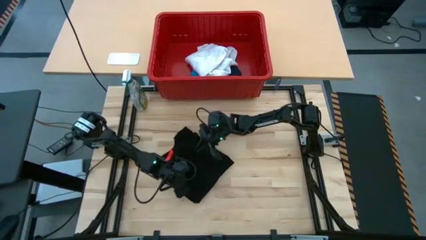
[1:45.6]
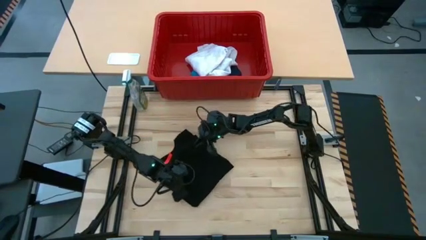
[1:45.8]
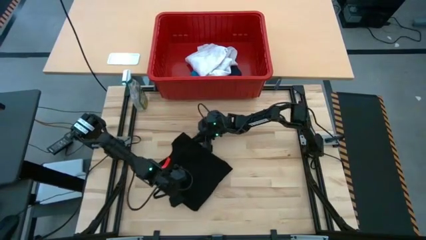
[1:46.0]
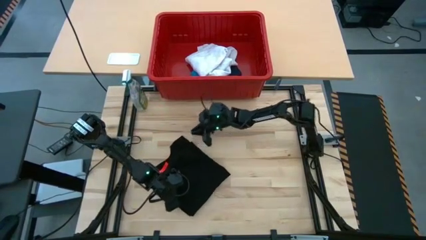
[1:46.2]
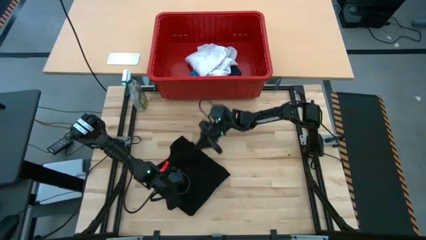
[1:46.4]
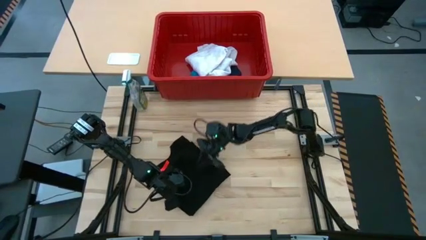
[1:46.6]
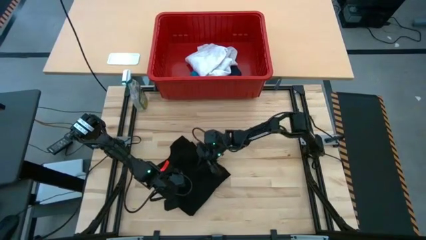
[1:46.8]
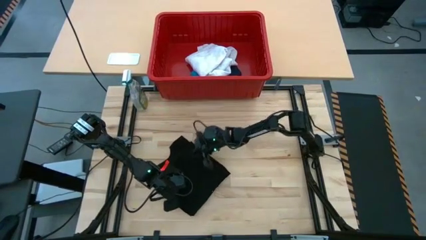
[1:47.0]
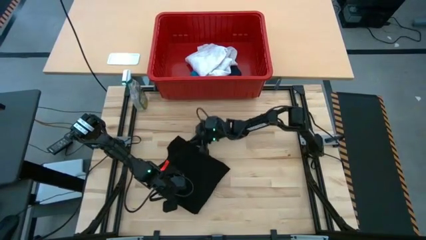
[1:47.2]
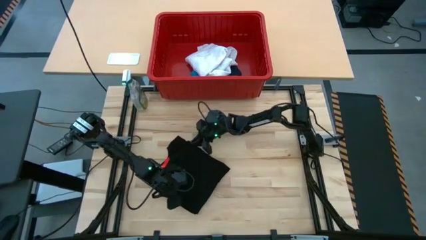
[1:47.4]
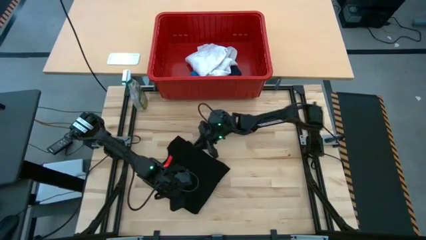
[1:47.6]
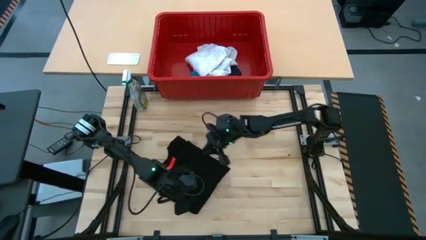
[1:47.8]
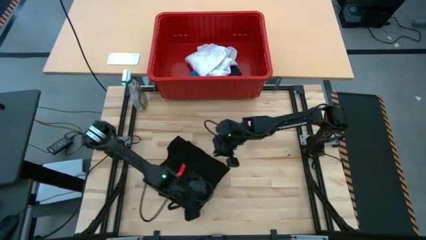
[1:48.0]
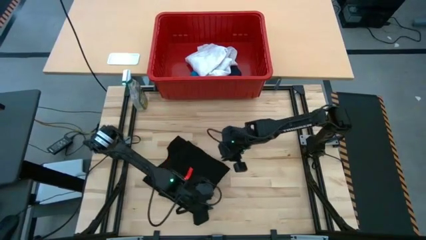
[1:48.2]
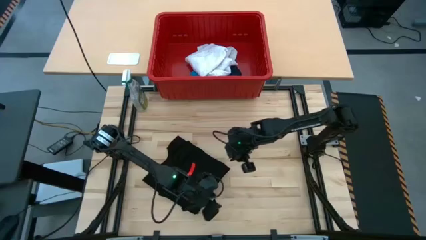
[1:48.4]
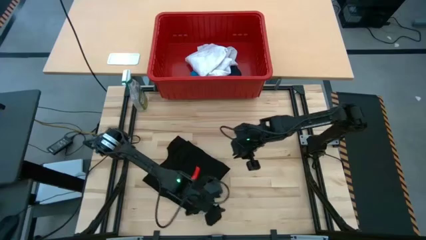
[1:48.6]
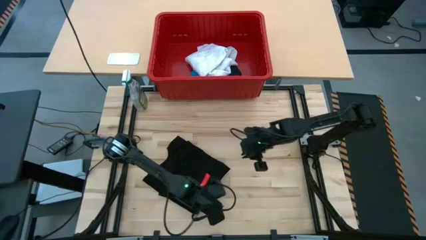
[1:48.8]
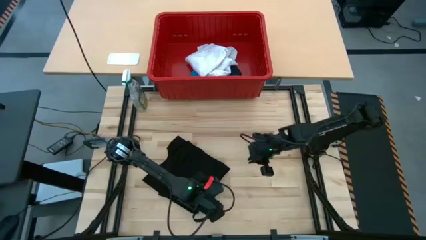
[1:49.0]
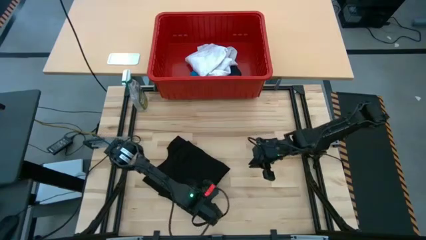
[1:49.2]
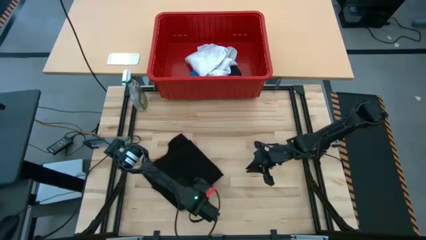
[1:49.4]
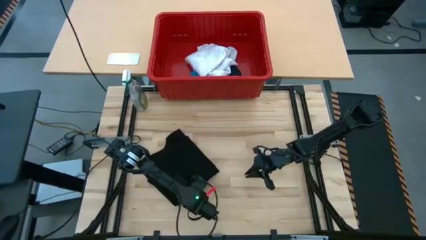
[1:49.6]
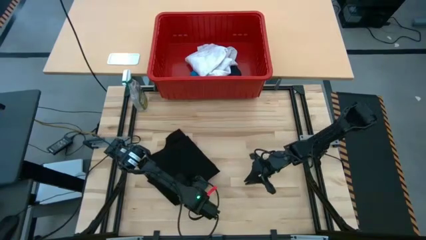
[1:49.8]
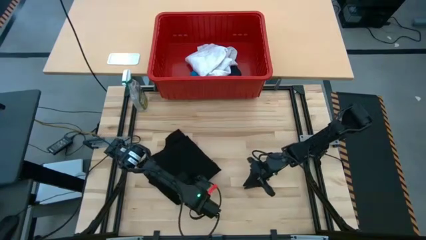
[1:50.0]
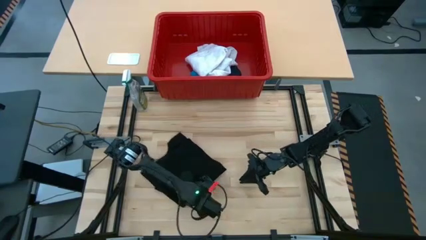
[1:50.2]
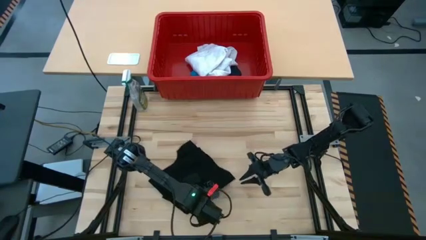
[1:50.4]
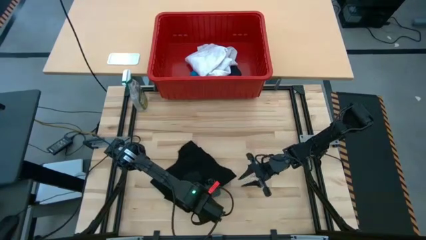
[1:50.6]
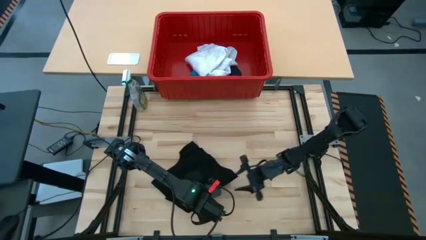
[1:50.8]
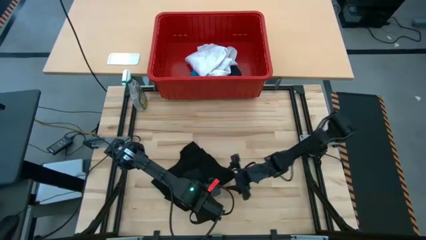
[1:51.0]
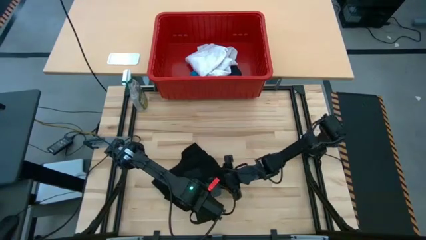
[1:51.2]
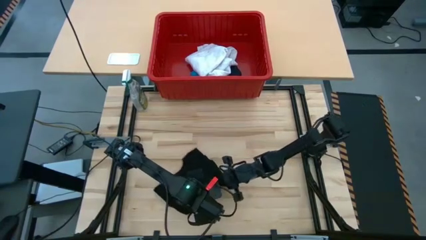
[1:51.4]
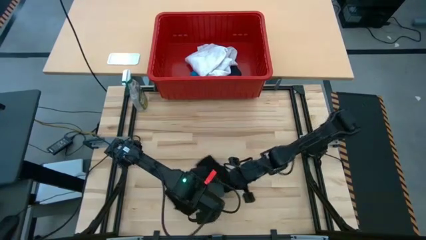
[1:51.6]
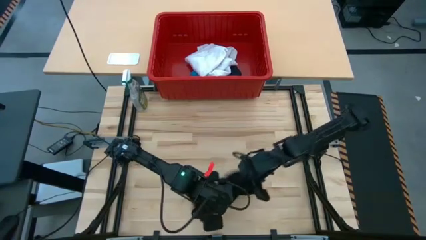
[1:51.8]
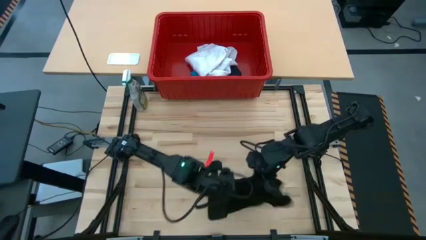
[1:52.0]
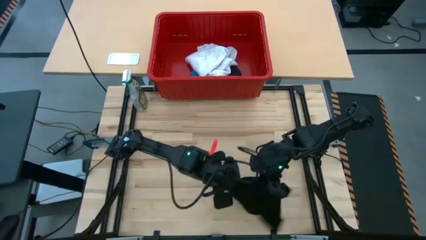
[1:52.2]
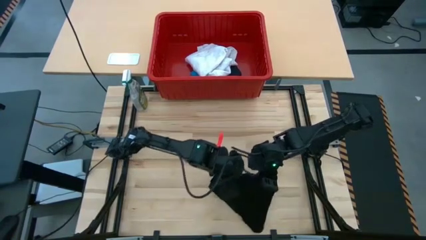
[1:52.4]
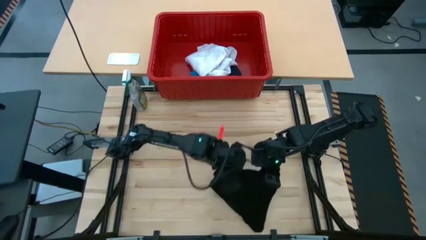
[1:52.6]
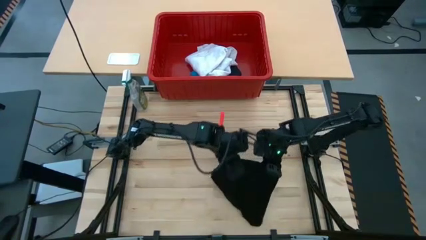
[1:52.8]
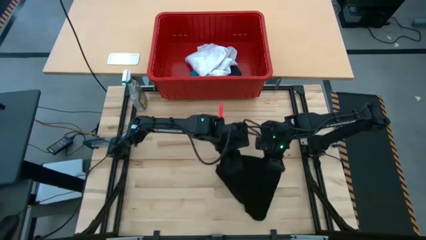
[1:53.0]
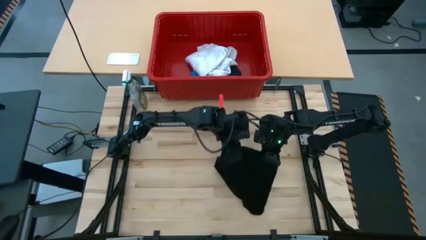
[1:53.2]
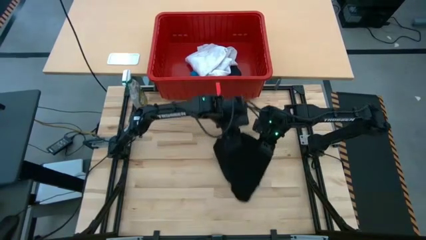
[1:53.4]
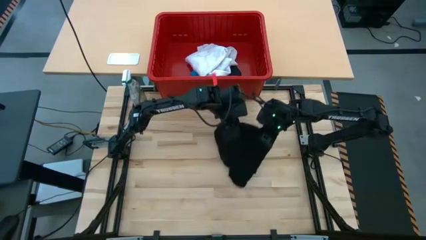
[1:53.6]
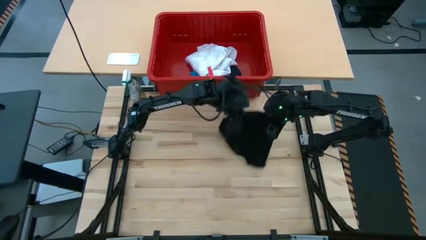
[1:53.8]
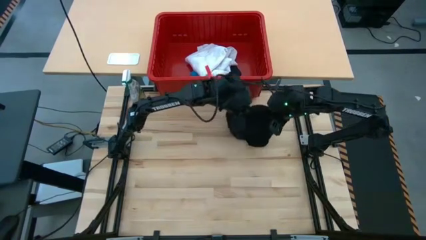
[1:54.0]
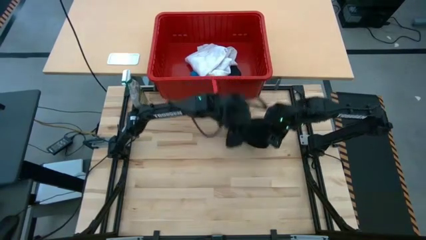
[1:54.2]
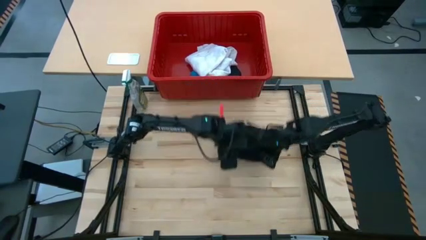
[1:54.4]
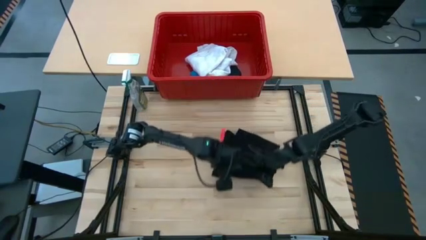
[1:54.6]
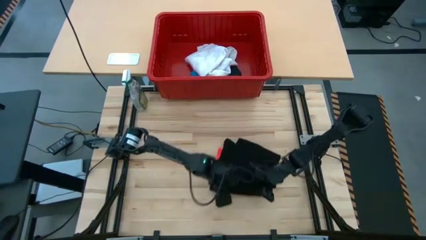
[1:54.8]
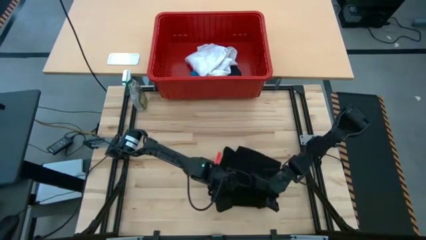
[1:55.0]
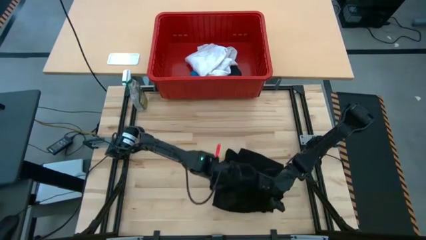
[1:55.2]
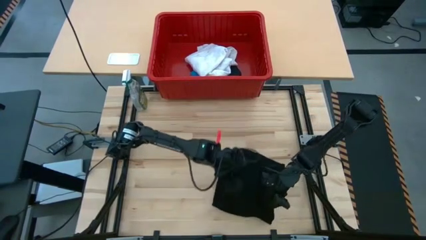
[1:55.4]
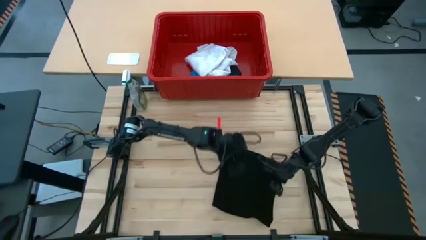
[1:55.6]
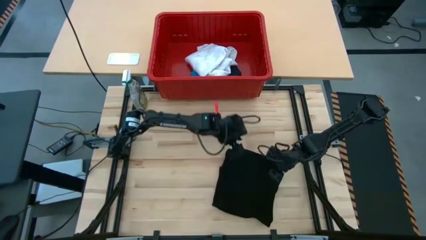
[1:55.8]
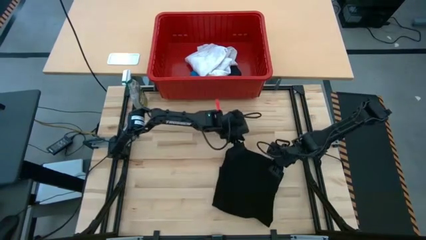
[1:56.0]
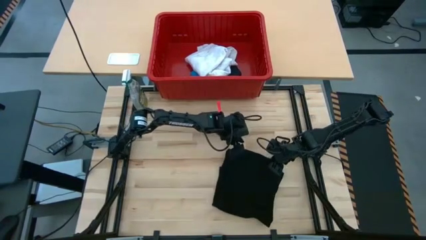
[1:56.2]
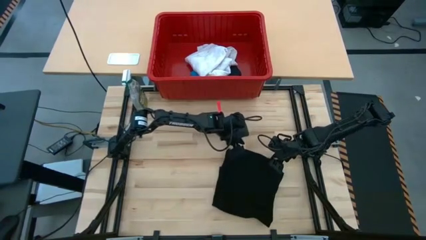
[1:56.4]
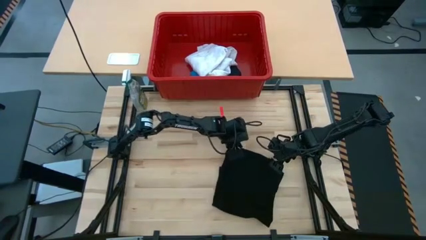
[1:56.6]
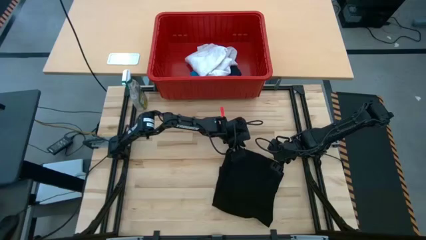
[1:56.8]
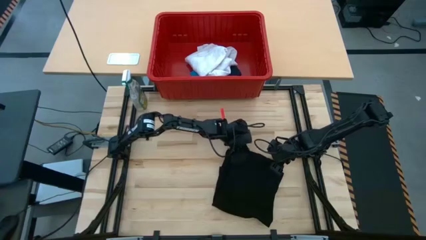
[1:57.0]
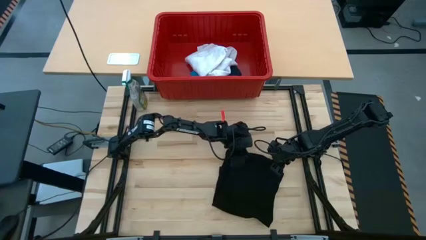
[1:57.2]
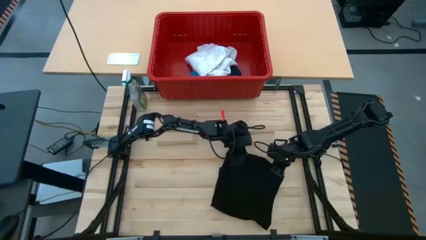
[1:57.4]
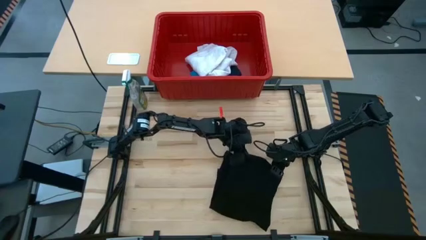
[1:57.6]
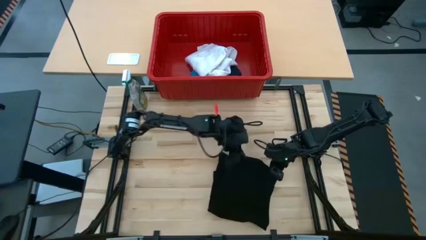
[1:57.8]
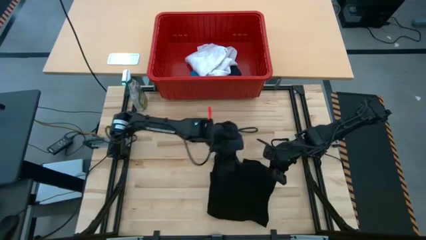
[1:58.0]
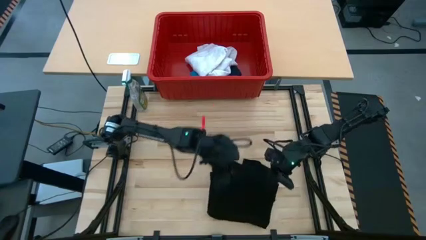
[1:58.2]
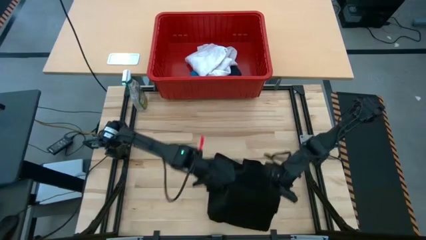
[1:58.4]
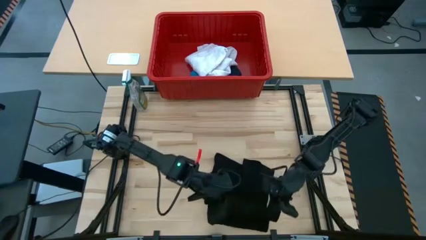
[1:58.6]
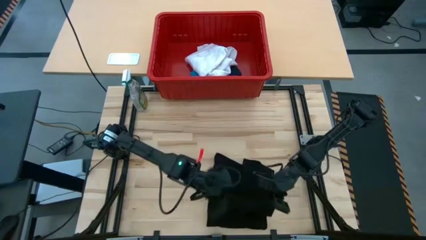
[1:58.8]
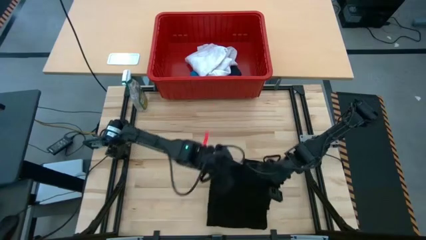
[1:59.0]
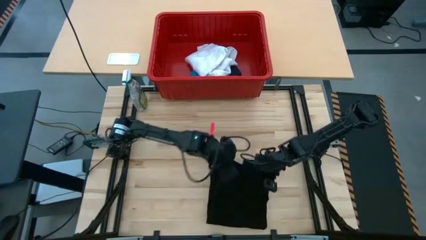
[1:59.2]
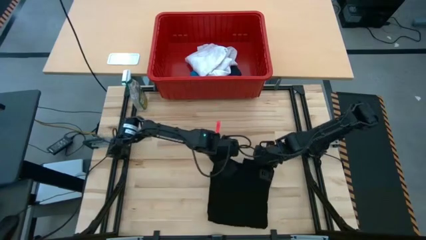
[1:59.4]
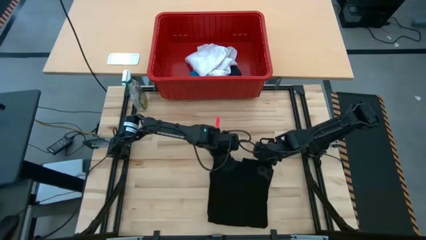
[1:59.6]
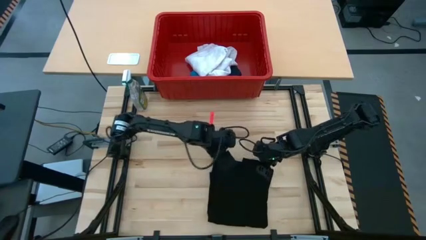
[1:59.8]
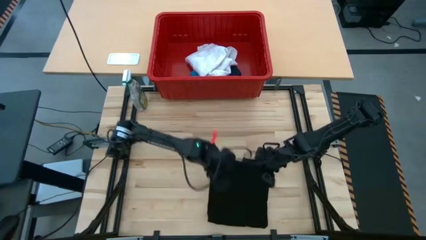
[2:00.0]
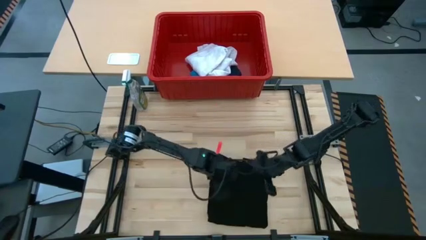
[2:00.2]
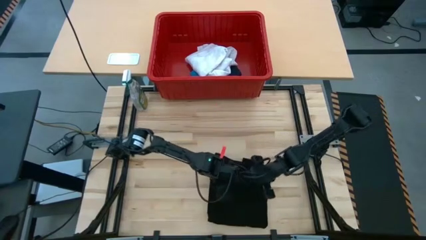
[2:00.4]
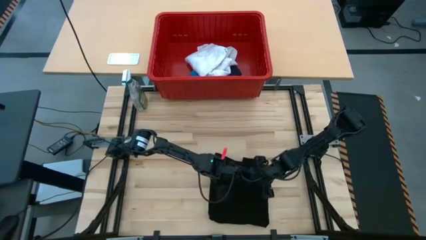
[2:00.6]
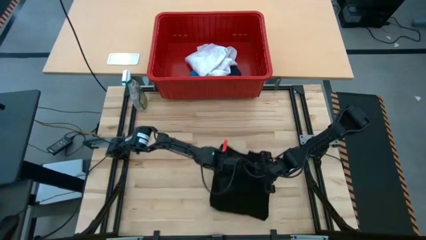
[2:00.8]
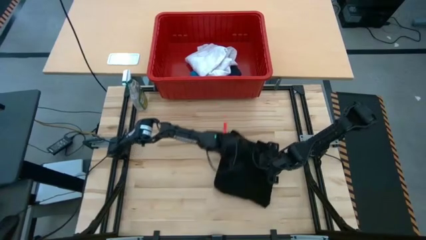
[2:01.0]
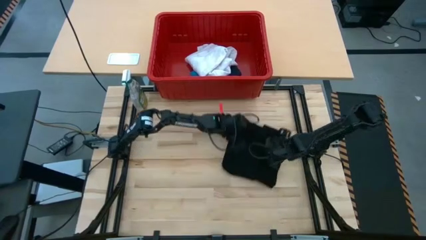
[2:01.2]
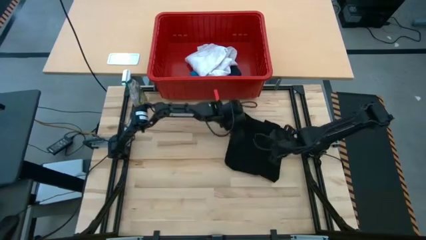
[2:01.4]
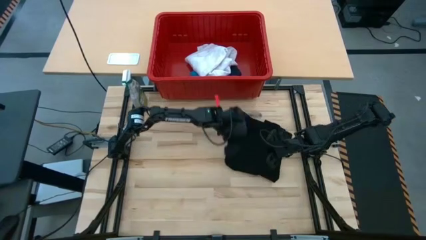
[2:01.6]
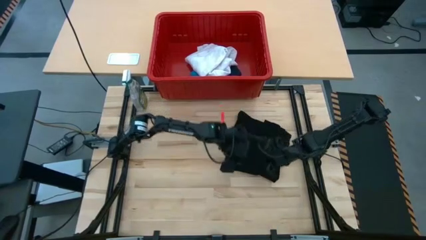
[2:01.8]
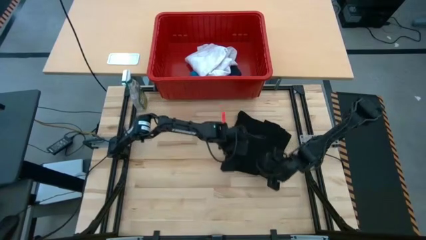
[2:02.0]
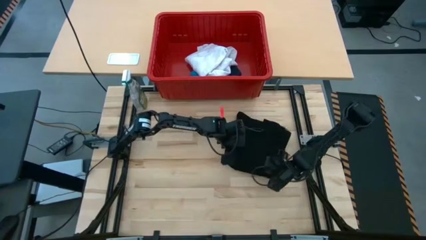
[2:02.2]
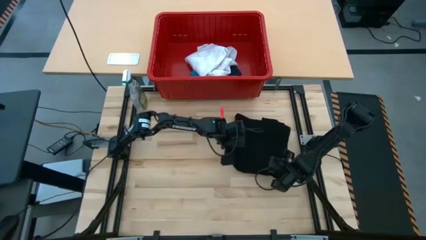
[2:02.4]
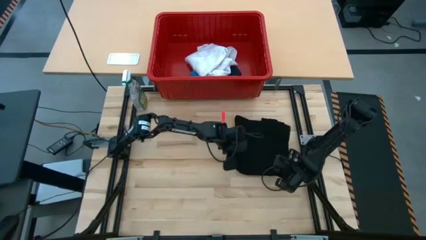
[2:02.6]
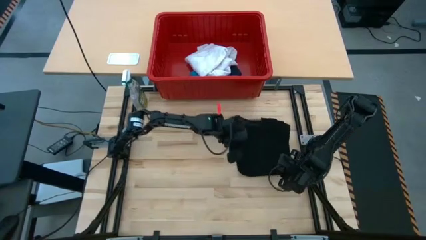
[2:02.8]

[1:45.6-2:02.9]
Task: Fold laundry
Fold the black shirt on the table
